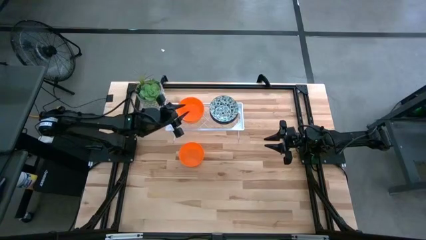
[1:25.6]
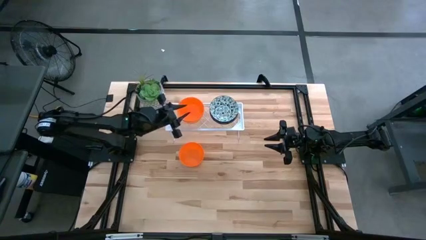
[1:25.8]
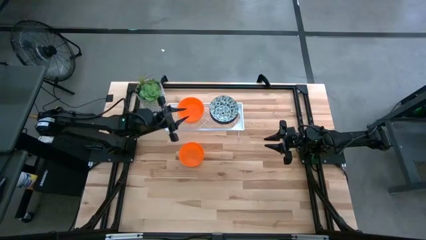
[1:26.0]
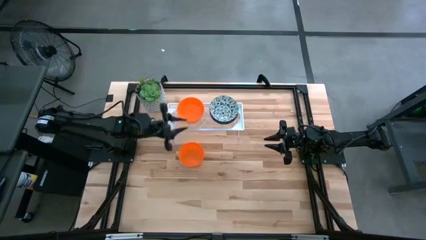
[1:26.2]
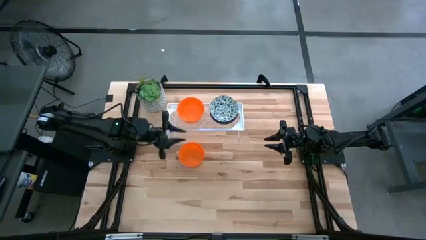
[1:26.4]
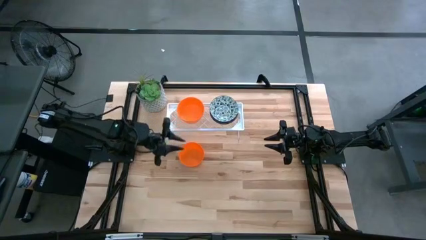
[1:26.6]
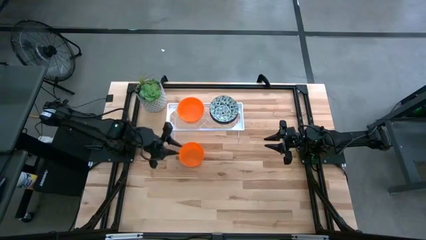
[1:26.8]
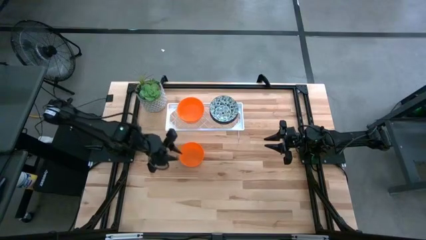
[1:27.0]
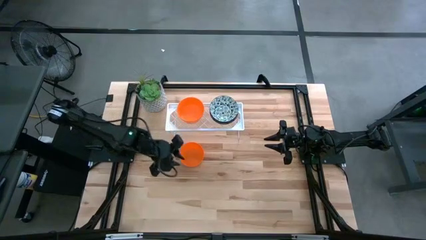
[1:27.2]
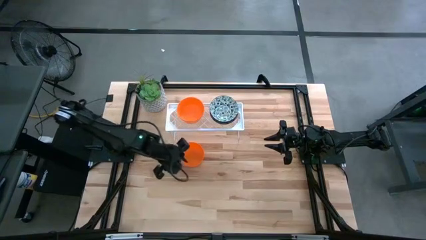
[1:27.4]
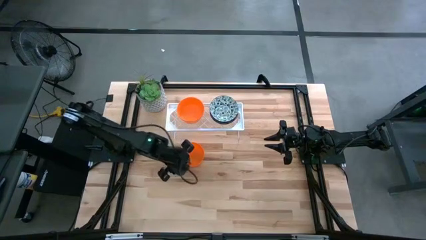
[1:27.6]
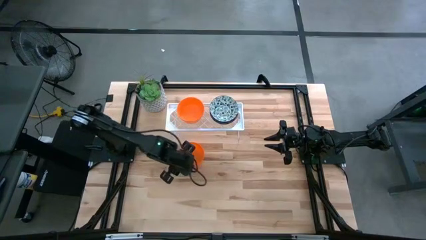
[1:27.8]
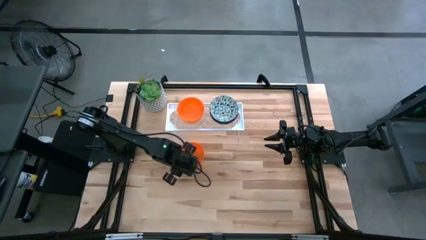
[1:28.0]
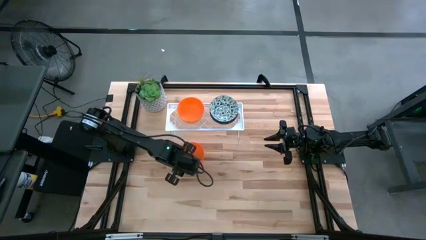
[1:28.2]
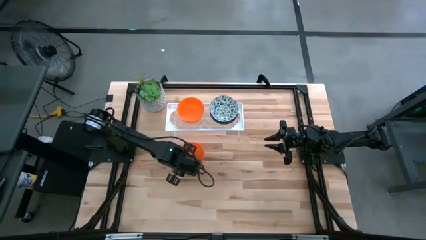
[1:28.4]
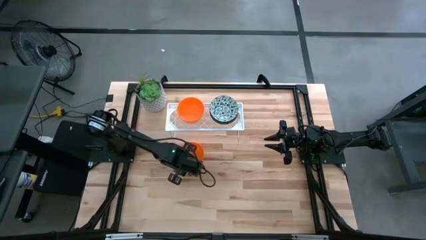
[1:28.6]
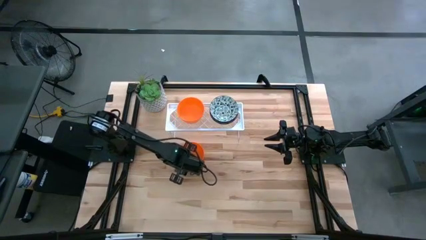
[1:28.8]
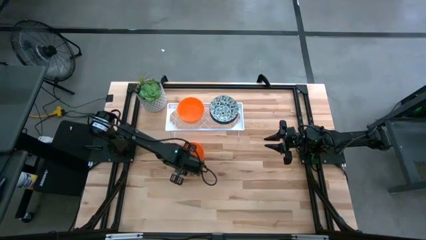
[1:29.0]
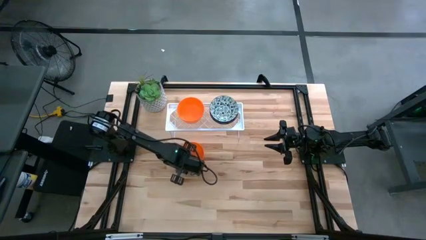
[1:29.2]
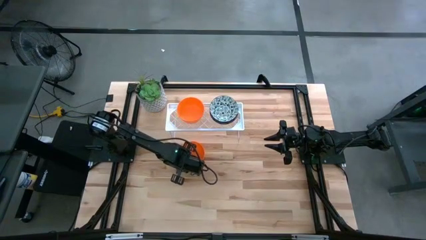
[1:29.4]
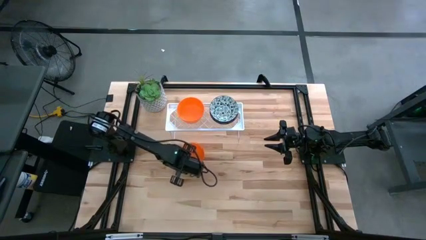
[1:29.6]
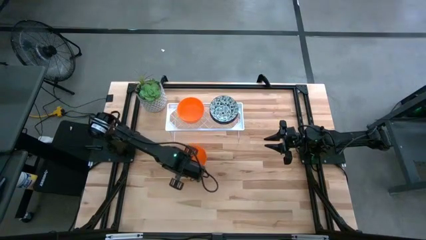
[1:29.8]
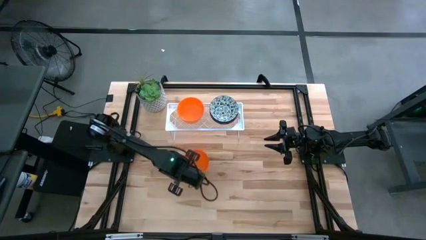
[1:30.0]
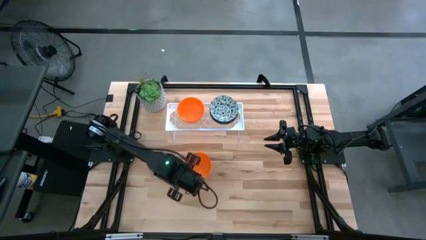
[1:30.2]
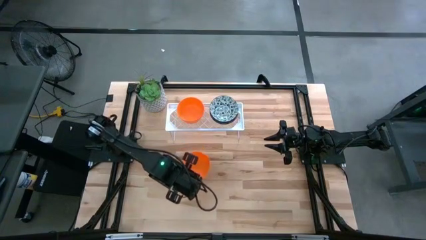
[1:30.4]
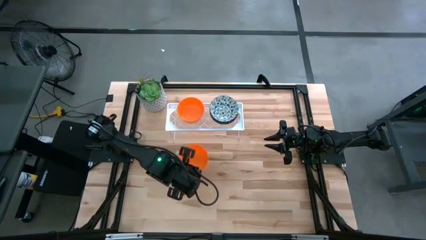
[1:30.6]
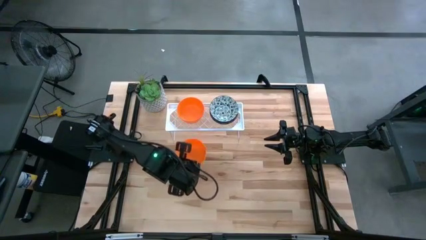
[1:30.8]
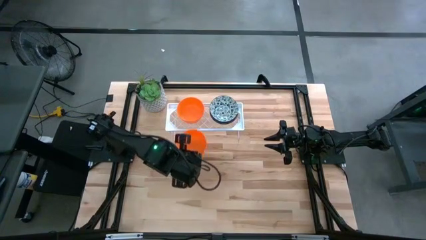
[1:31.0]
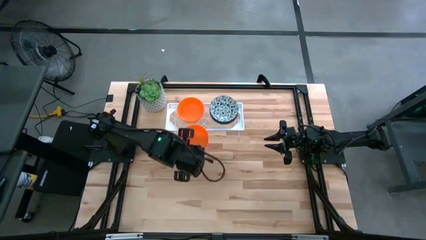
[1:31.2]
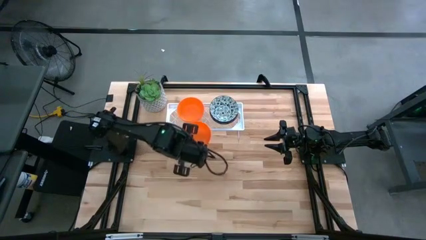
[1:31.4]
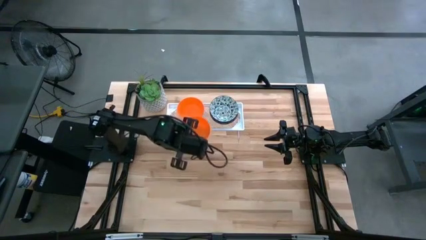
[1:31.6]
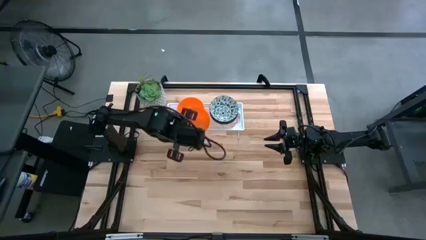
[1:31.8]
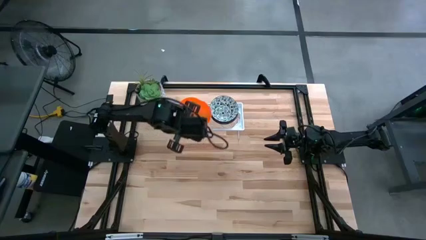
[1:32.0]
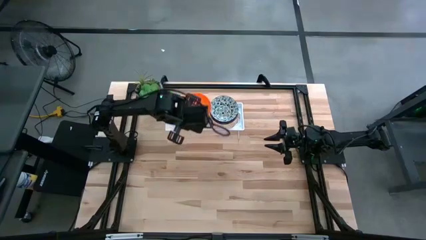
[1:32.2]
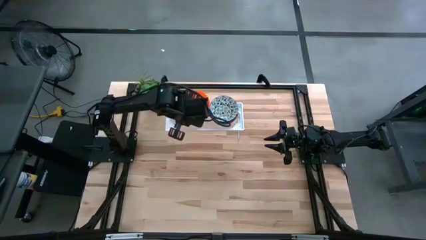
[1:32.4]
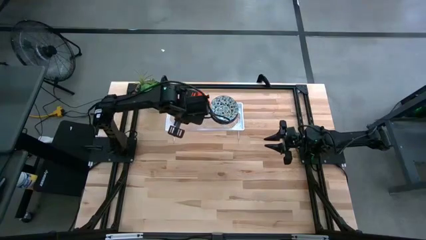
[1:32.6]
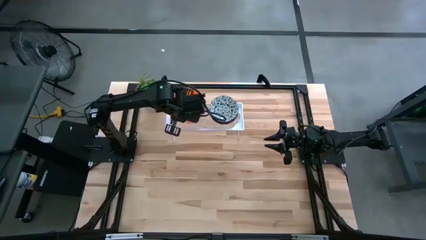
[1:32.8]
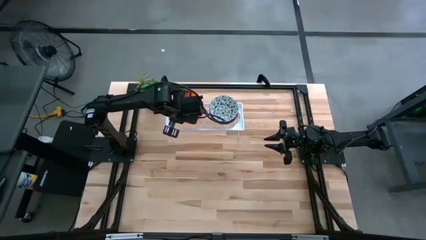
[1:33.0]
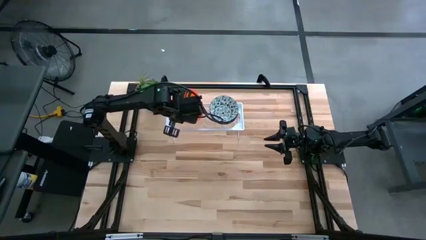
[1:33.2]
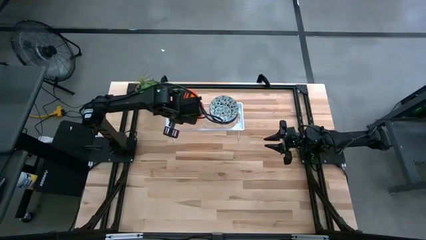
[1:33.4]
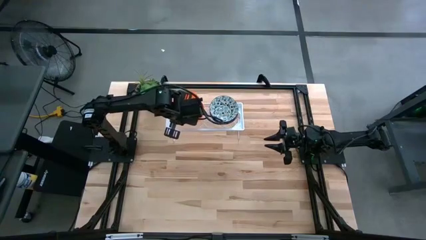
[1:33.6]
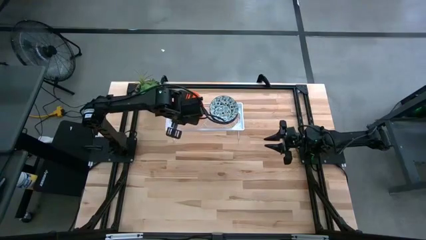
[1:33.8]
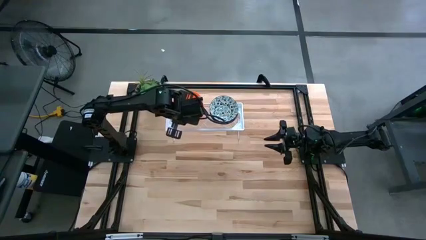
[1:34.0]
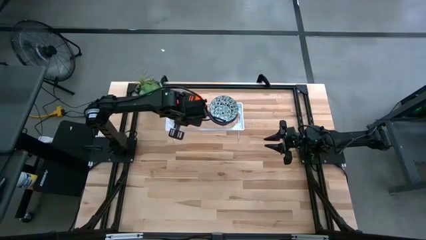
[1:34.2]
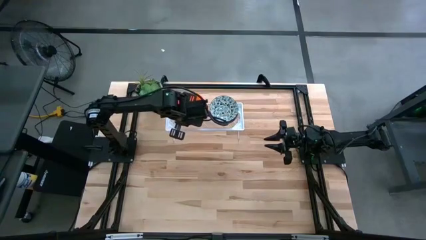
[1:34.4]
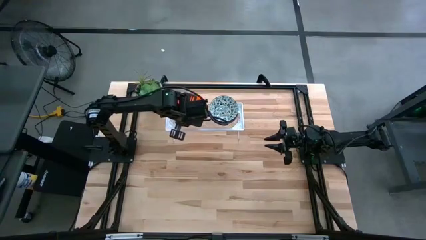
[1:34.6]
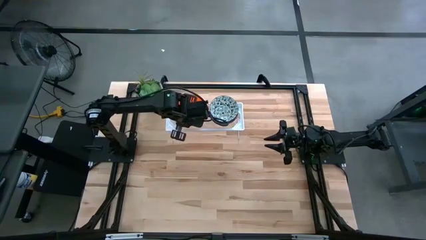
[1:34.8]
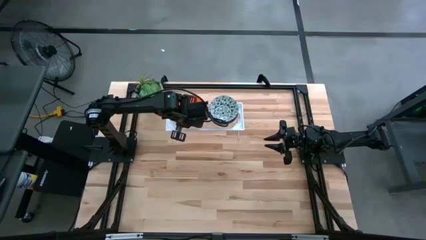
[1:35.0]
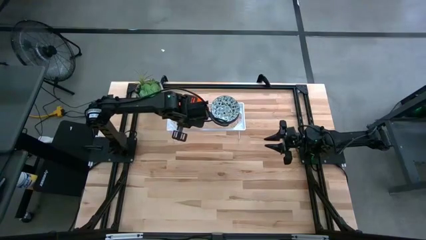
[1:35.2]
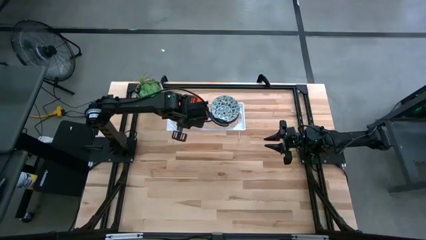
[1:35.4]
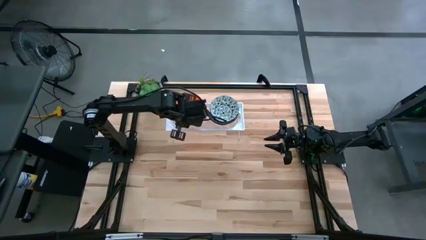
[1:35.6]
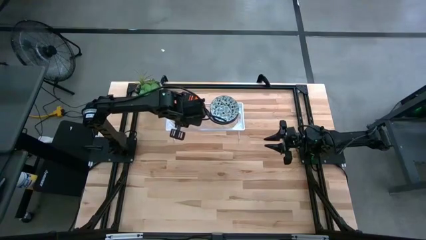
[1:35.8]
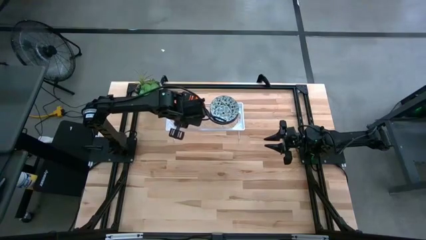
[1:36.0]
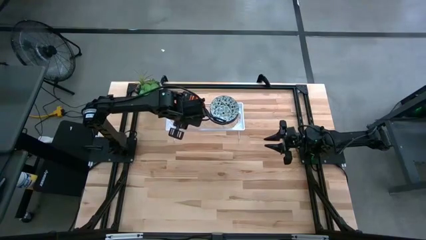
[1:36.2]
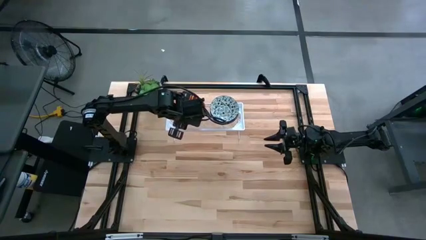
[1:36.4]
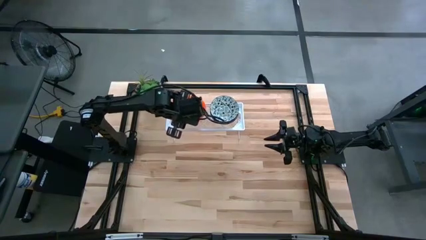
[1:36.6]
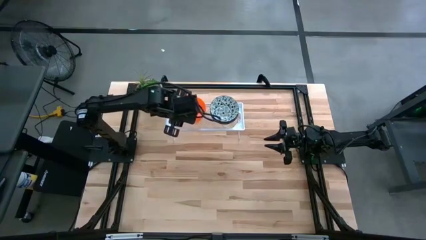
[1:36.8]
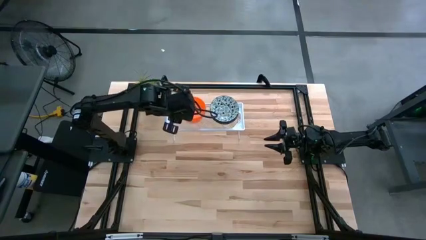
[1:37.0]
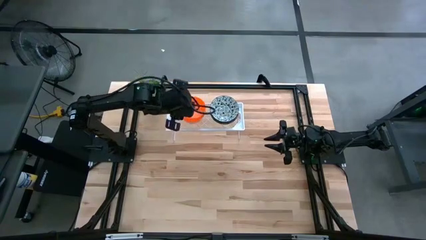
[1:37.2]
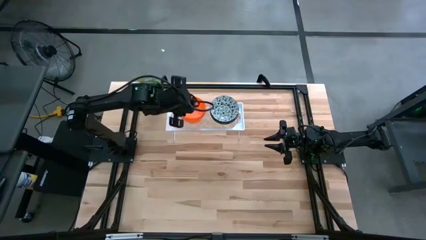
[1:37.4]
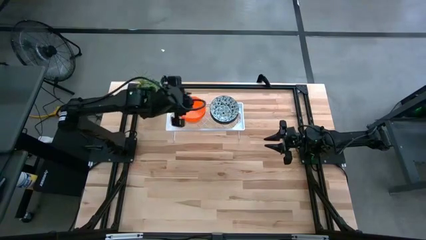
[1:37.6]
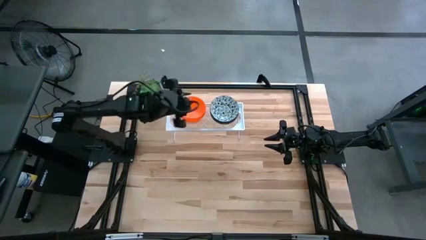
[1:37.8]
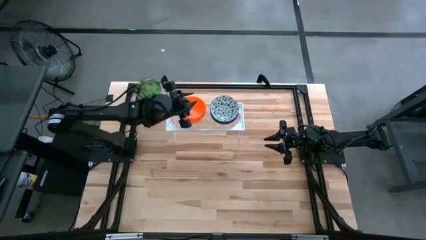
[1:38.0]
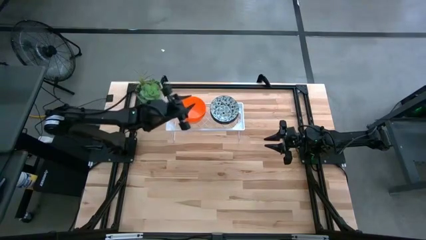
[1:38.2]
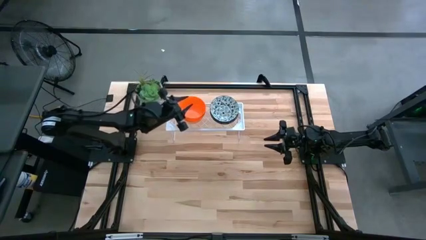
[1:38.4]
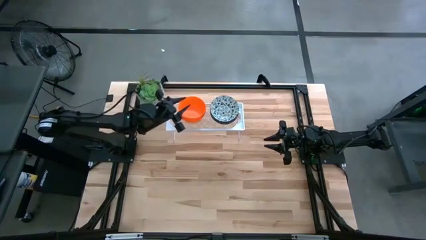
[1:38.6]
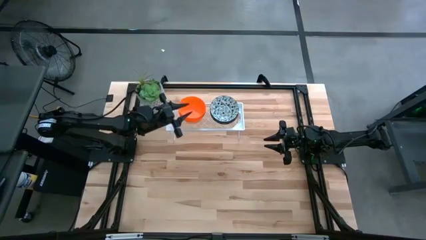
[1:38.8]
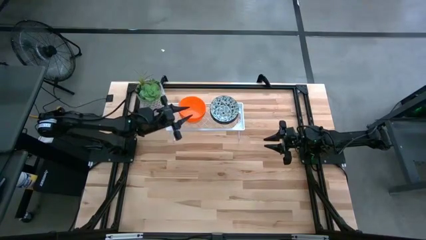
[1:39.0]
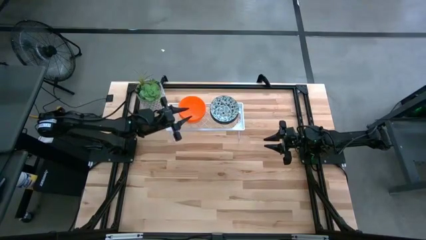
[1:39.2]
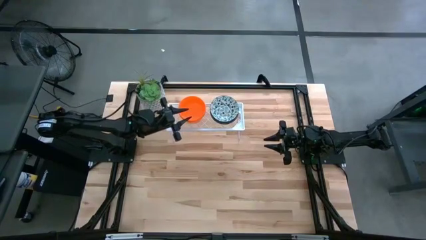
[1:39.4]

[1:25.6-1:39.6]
Task: Pick & Place Mini bowls
Stack the orange bowl on the orange bowl on the shelf
